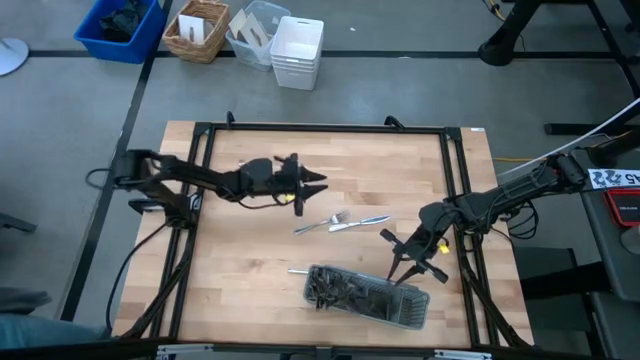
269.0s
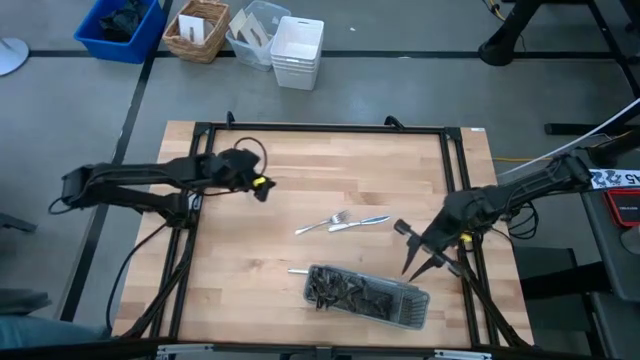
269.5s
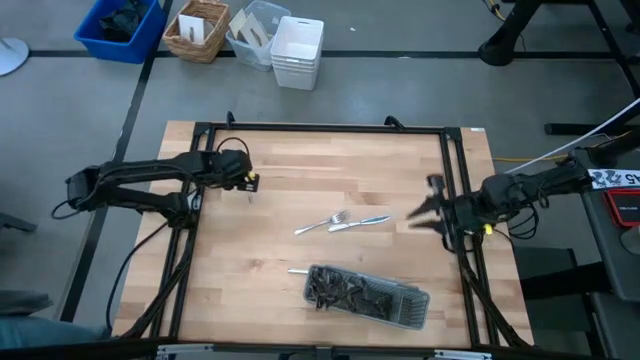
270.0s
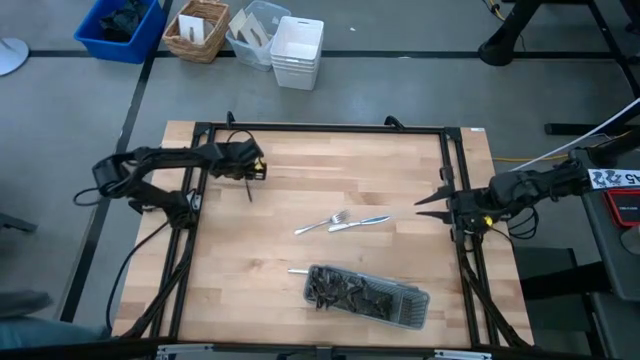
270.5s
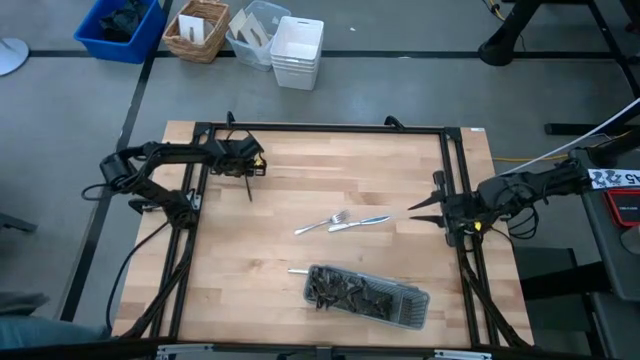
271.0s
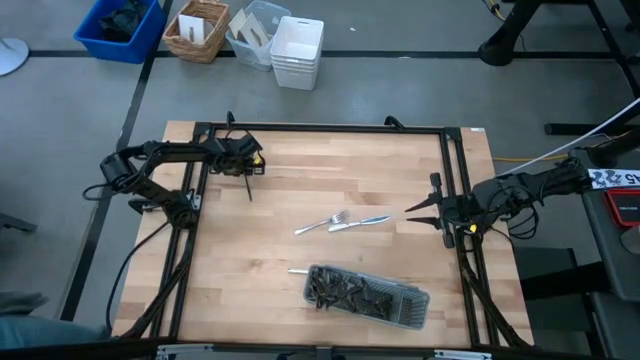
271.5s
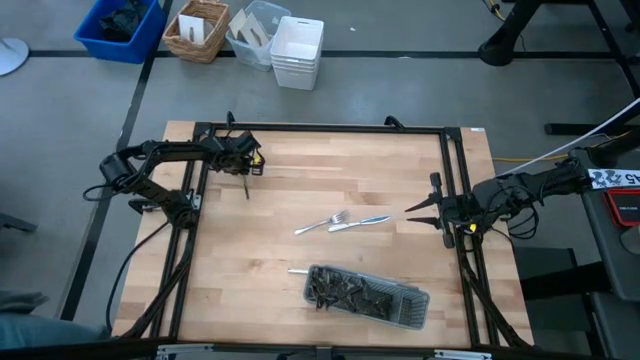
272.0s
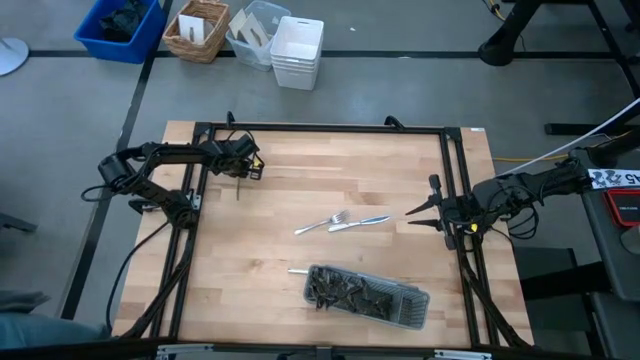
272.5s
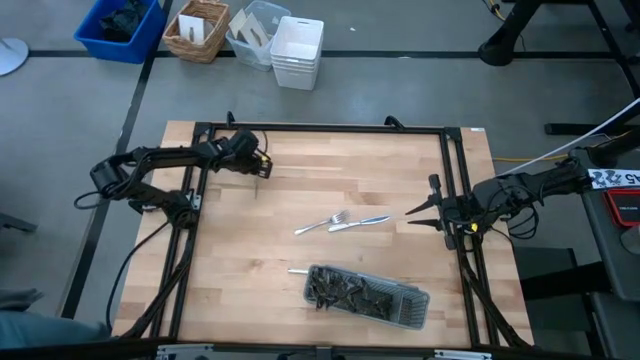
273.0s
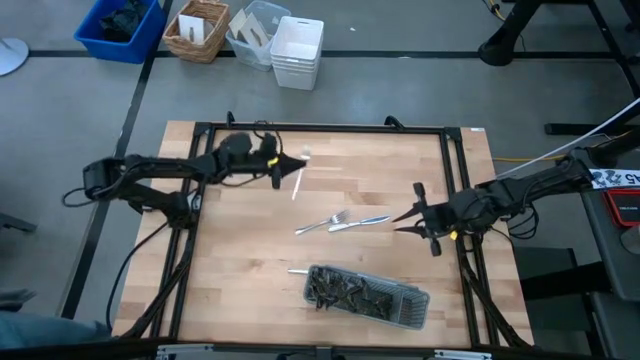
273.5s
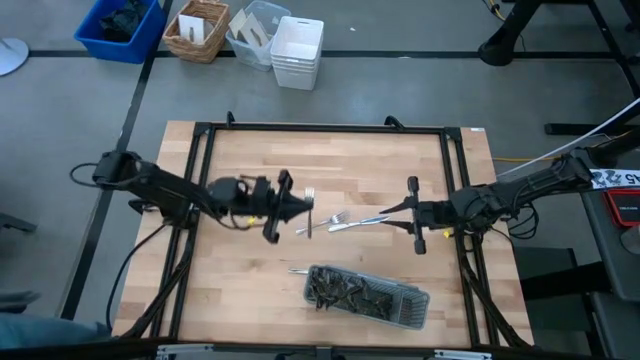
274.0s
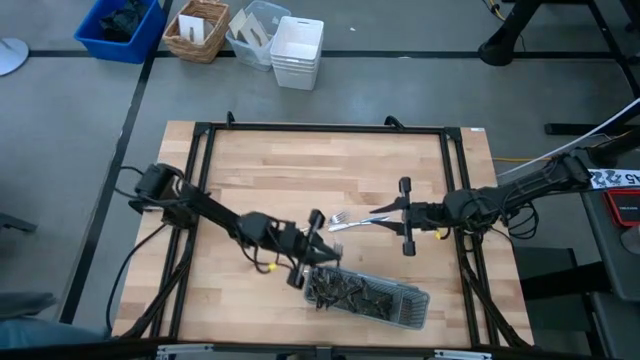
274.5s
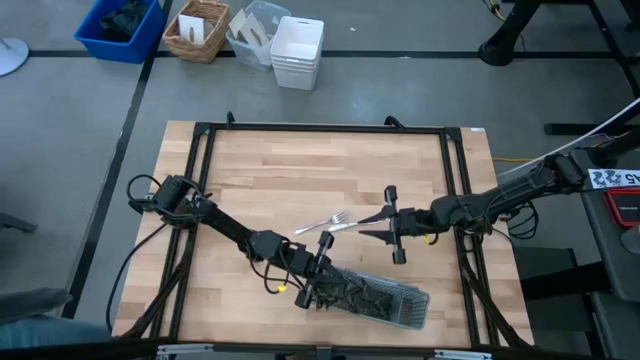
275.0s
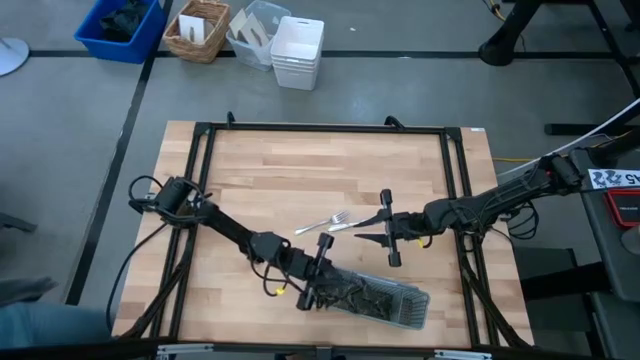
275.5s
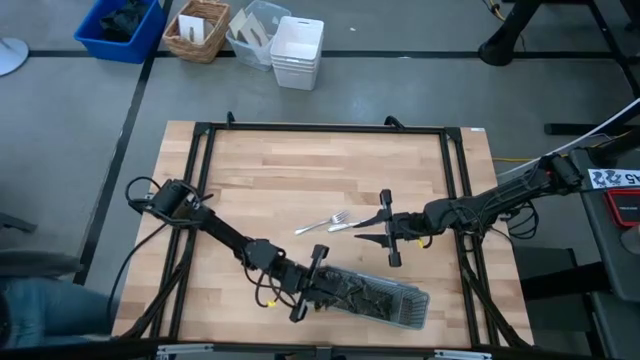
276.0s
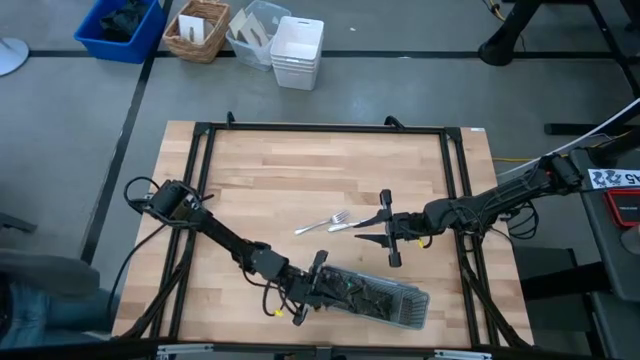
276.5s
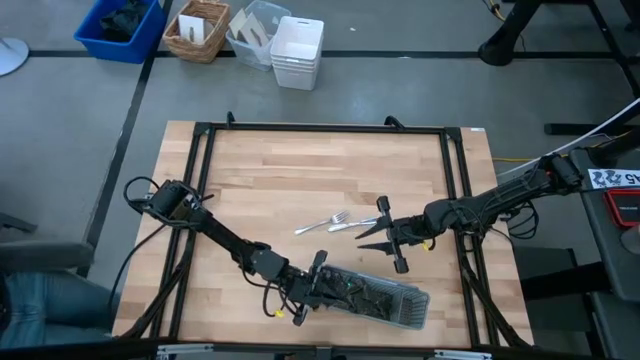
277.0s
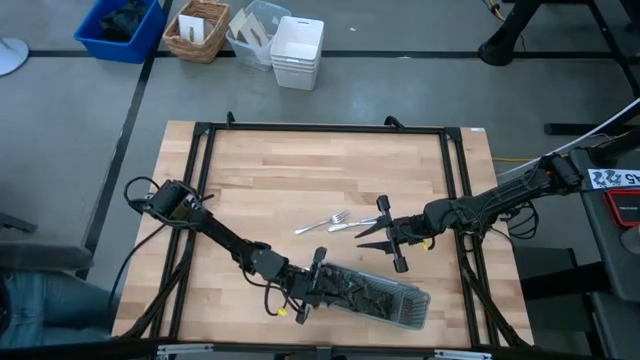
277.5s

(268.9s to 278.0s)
Task: Sort silverware
Put the fork into the gray silverware rack

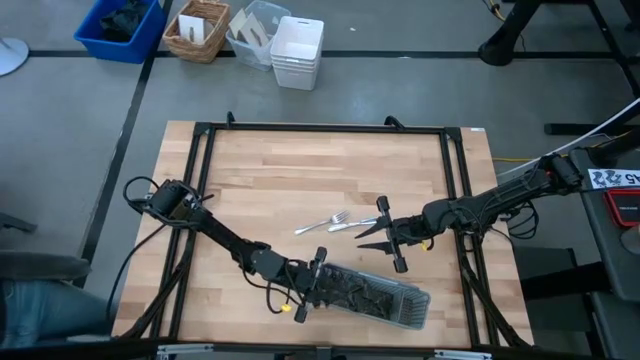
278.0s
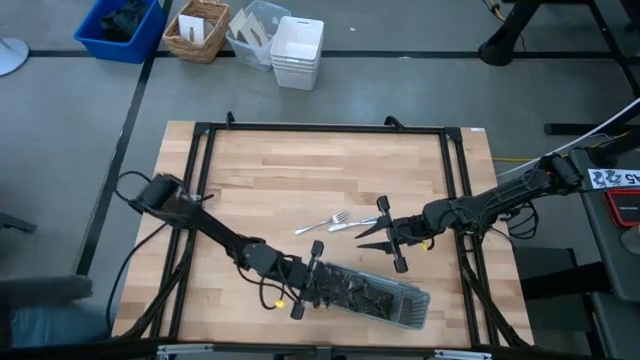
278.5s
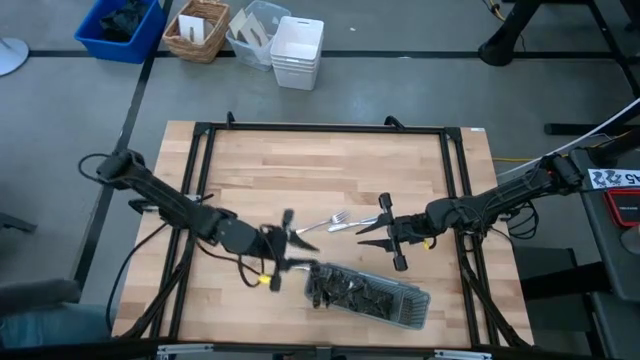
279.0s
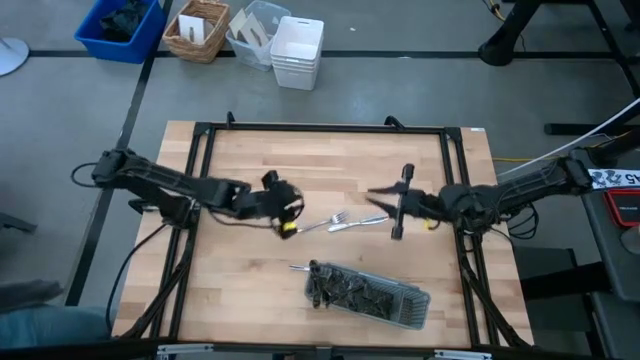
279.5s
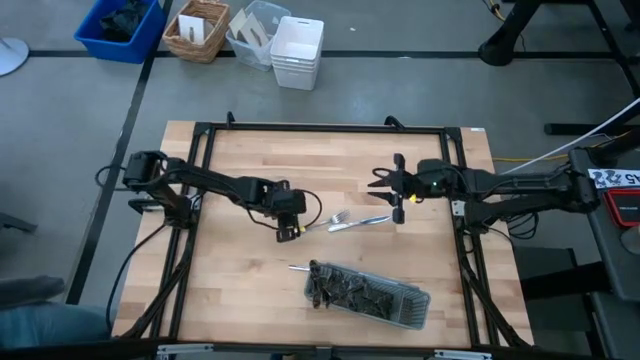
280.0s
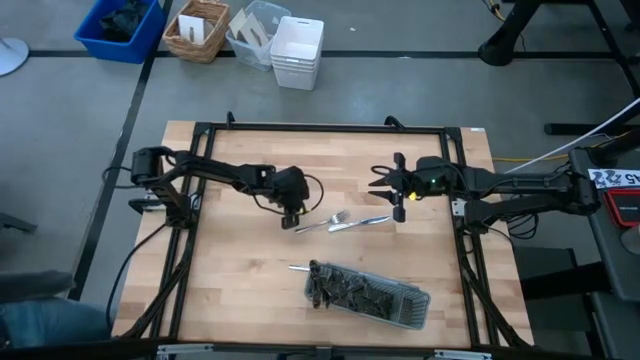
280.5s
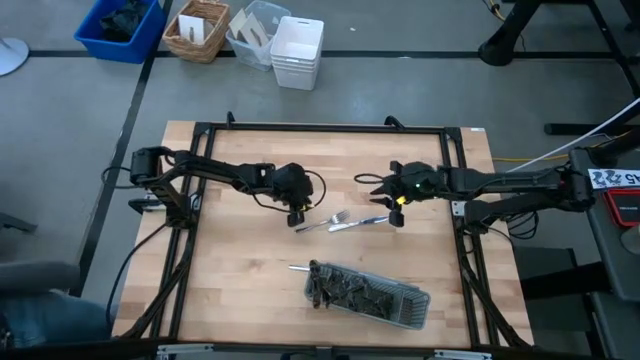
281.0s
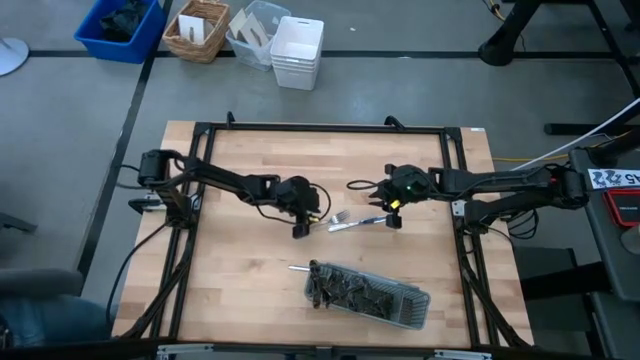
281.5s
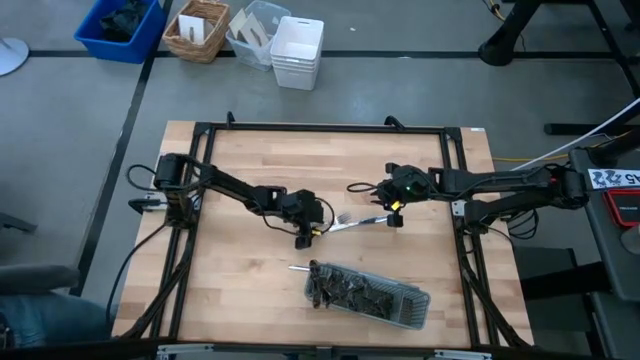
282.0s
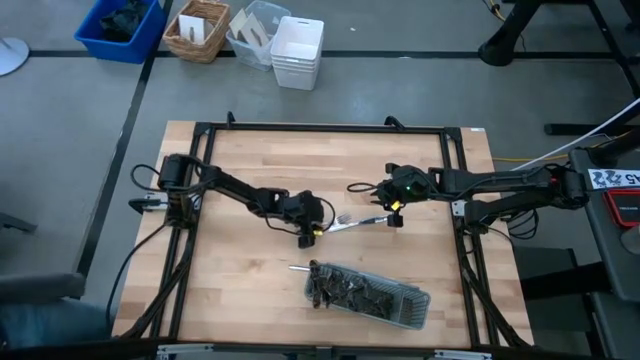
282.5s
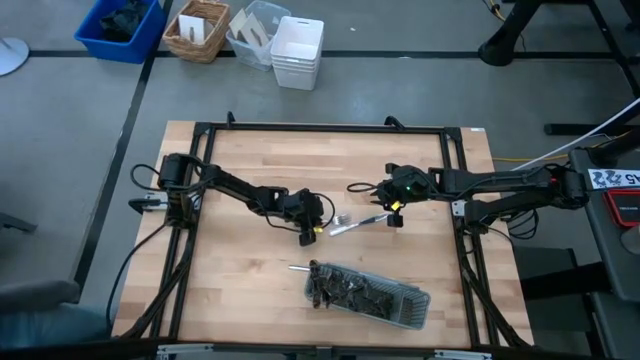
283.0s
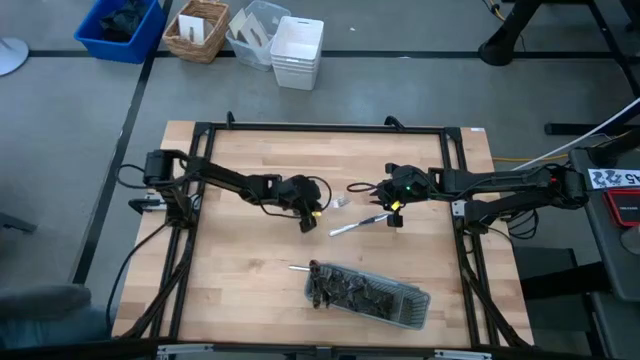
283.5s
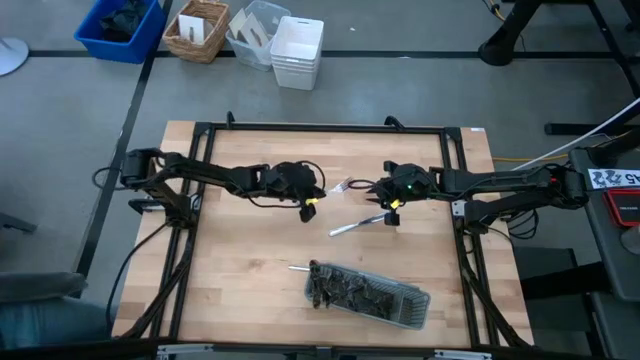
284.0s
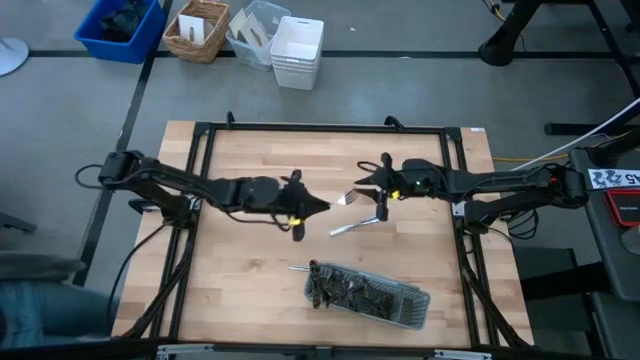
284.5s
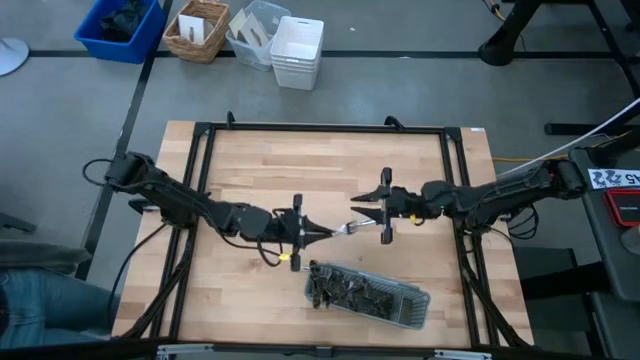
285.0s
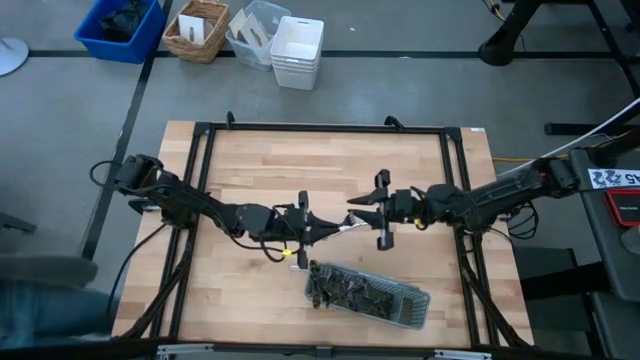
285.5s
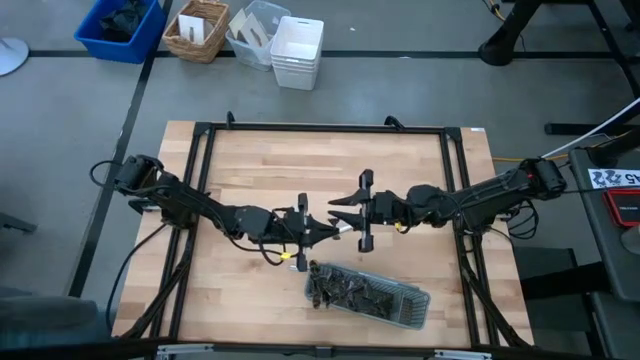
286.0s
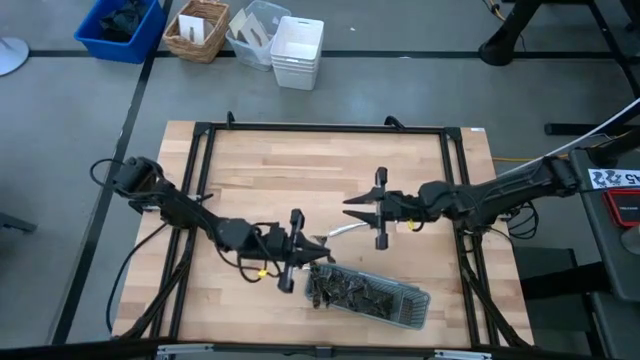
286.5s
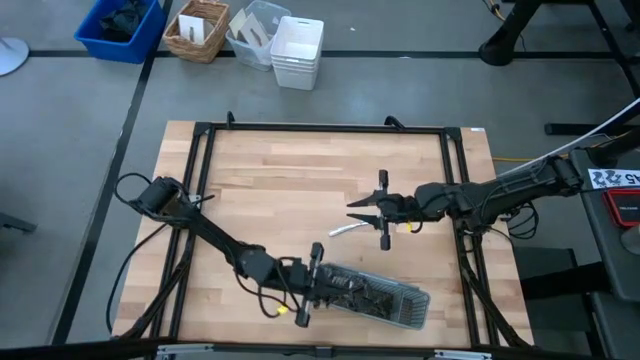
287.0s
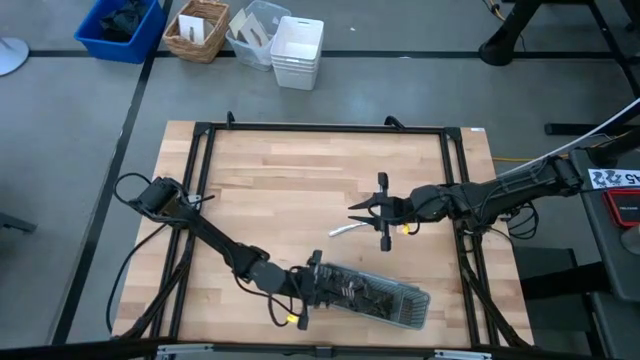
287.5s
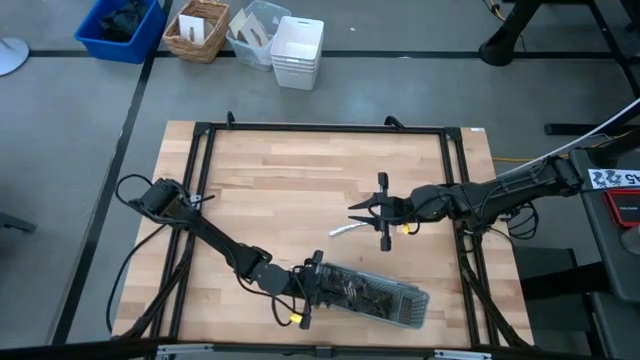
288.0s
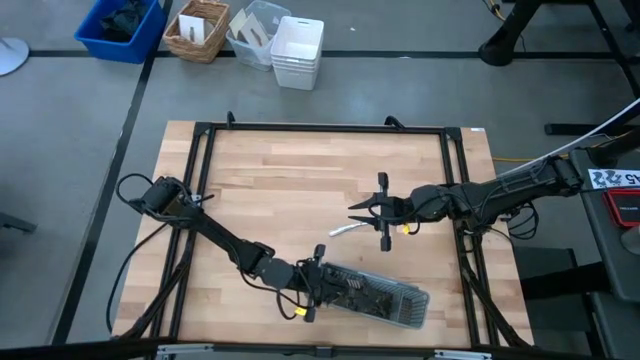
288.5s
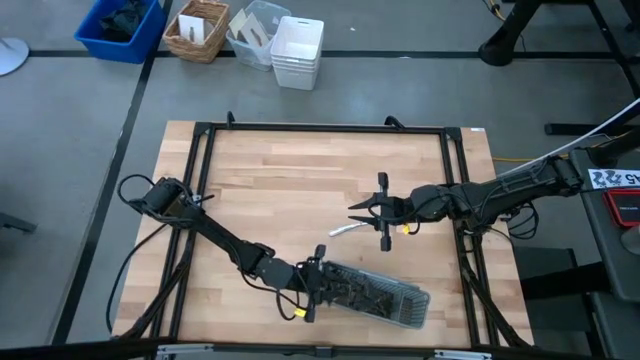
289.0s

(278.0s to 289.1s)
Put the fork into the gray silverware rack

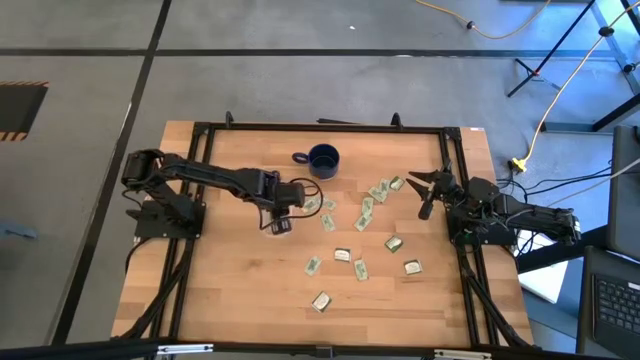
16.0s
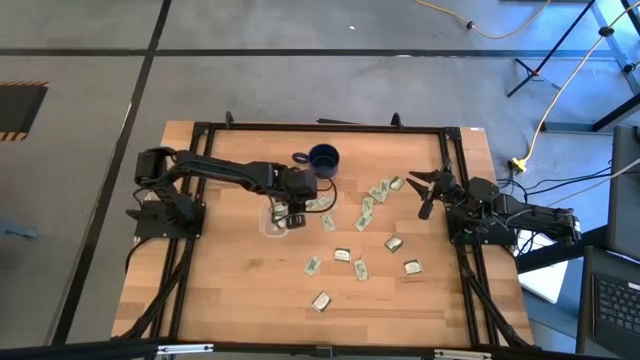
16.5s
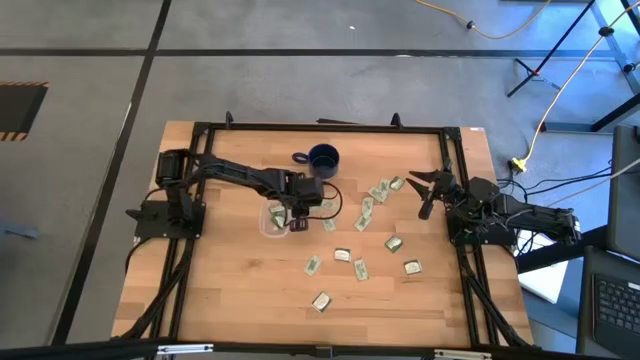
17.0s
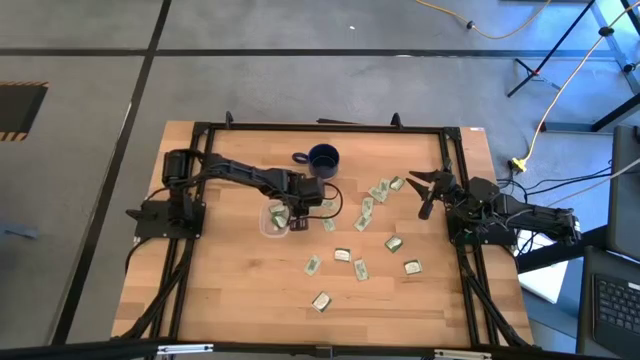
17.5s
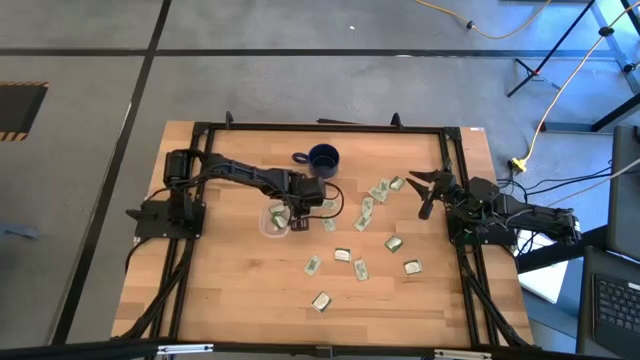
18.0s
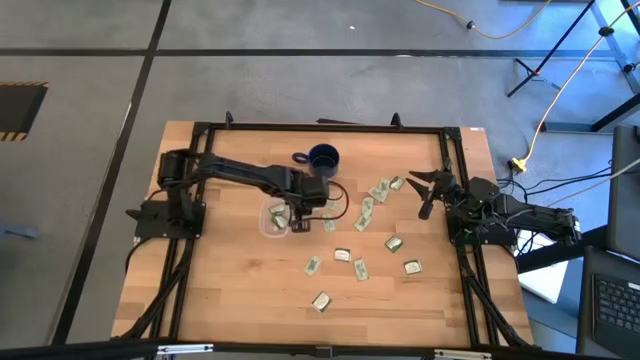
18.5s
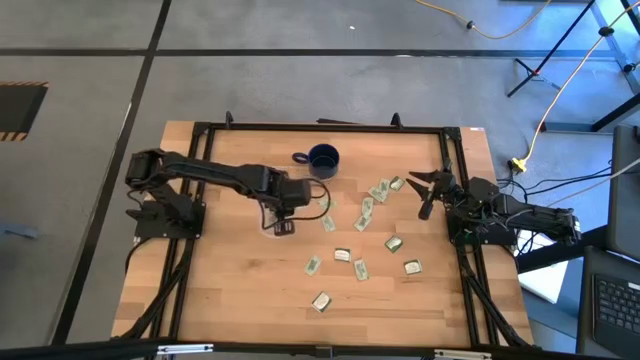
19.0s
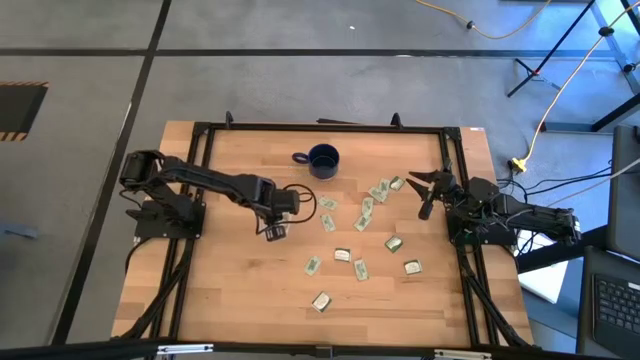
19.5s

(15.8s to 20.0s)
Task: Pick and place Stevia / Truvia into bins
Put the white stevia packet into the transparent container
